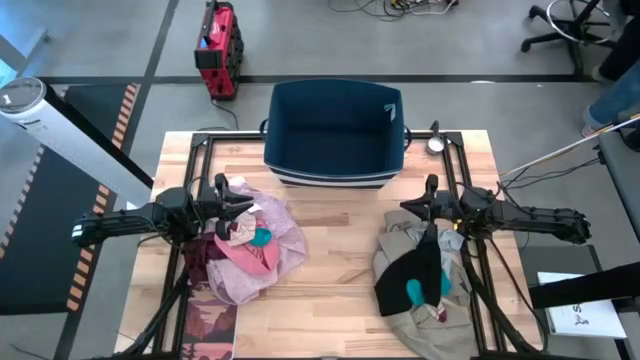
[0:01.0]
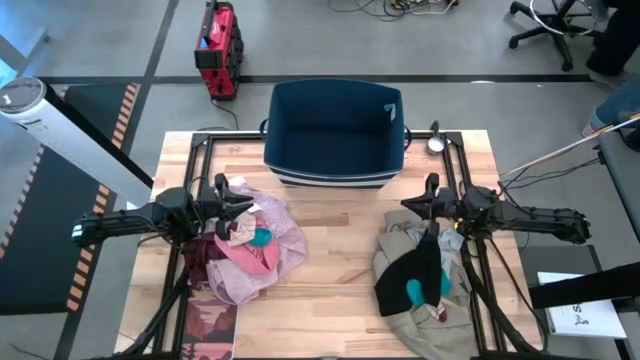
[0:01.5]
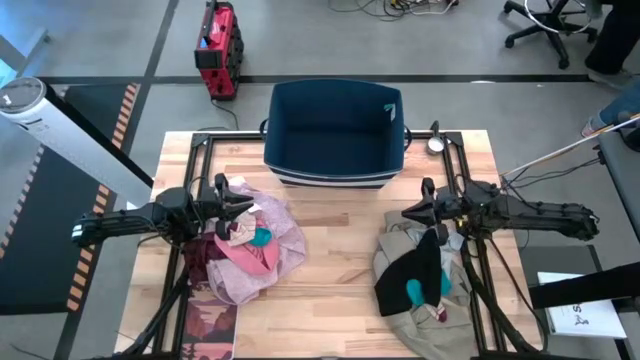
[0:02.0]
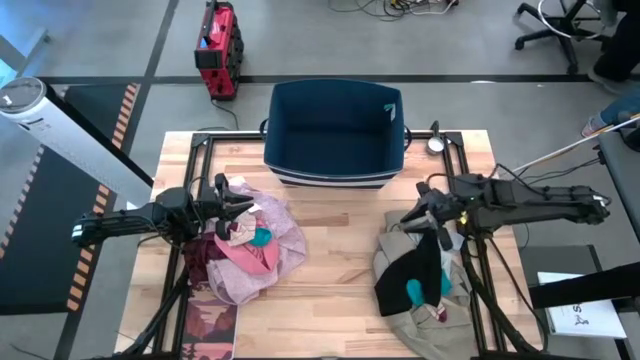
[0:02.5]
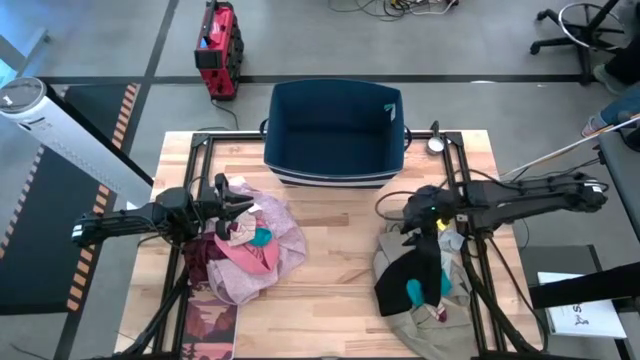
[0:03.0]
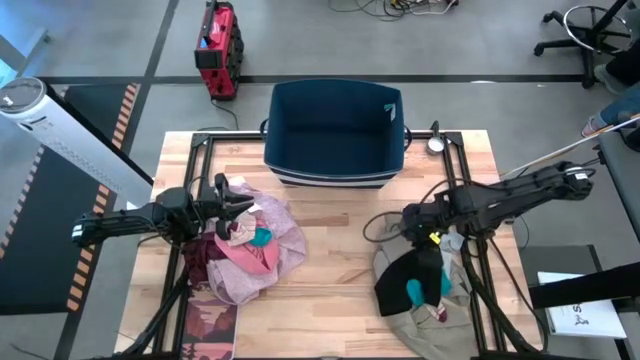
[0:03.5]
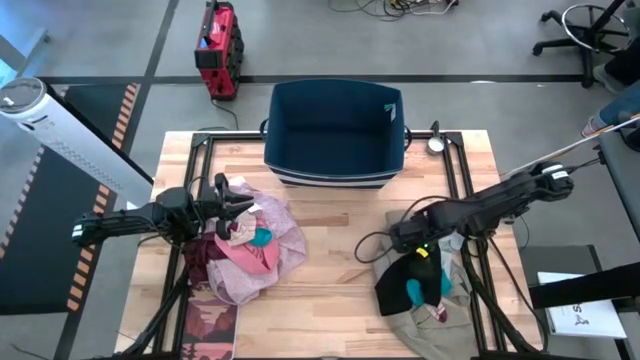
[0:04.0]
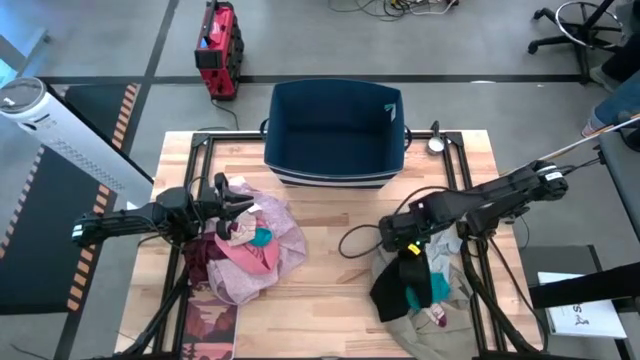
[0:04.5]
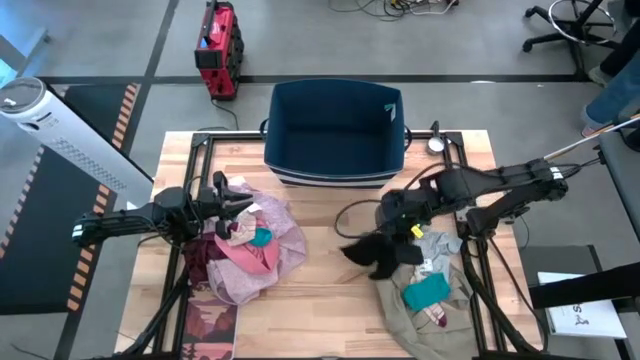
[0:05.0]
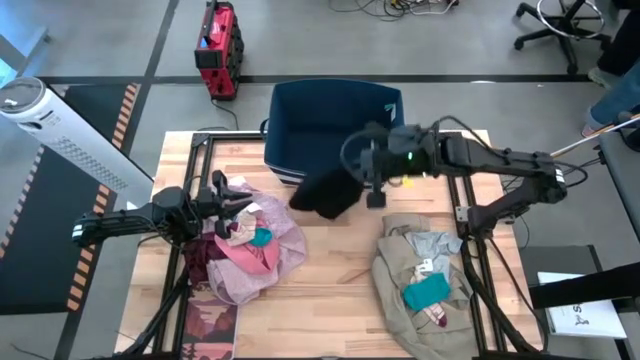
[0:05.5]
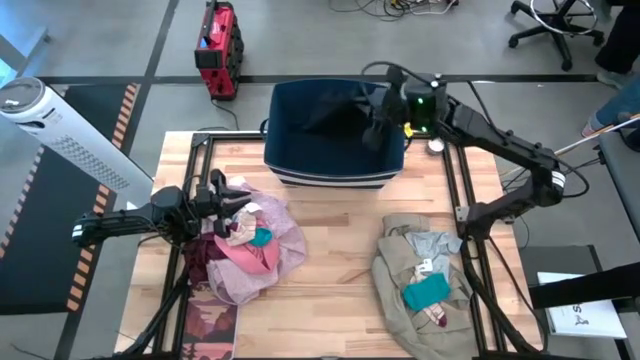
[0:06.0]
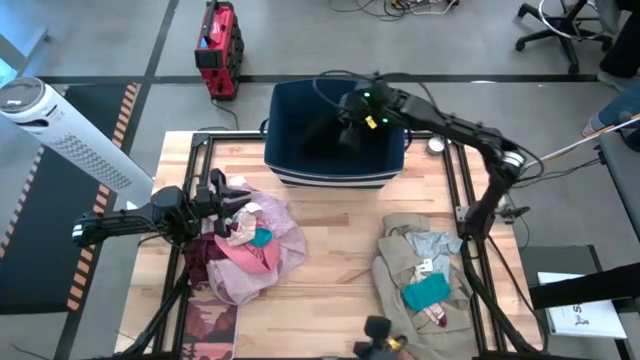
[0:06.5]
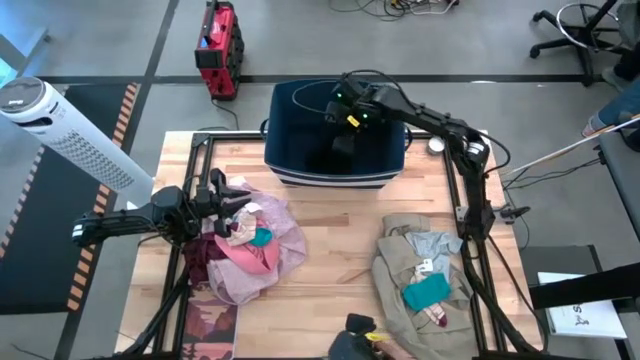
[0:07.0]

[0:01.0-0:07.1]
Task: Sort clothes
Put the black shorts into the blue laundry organizer

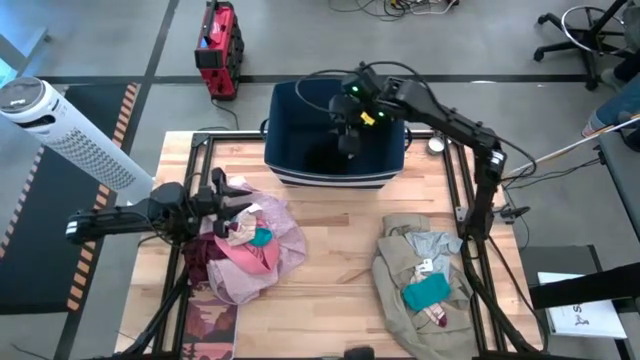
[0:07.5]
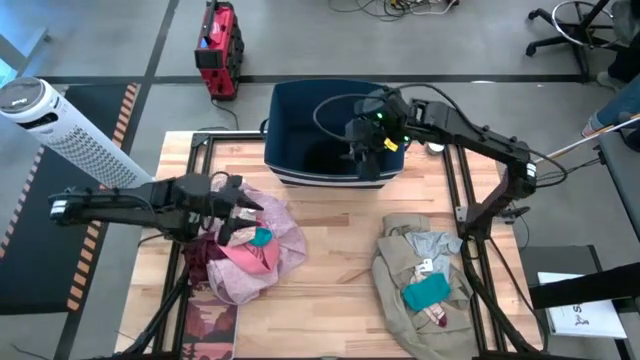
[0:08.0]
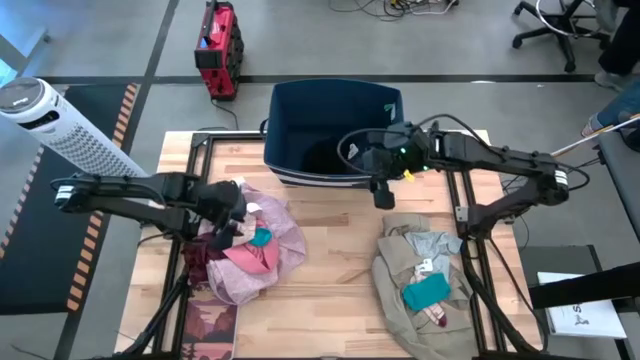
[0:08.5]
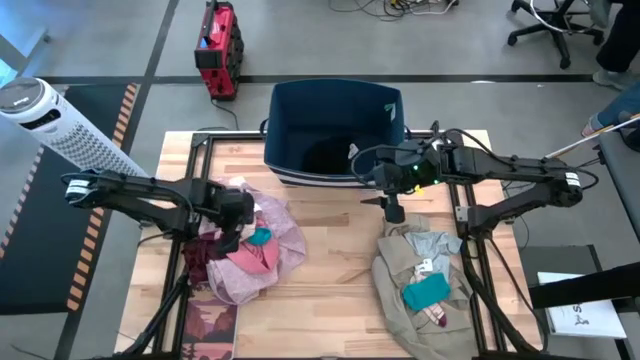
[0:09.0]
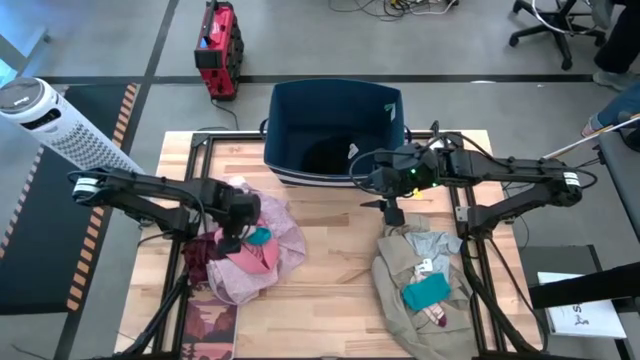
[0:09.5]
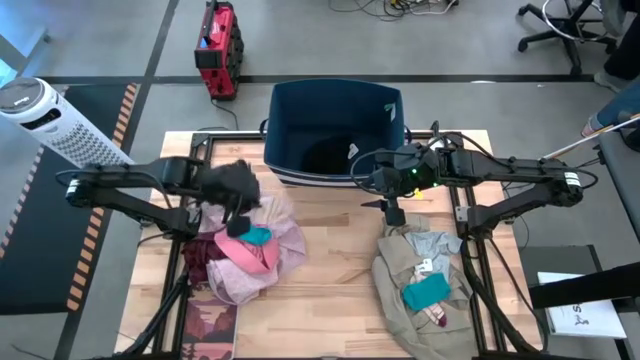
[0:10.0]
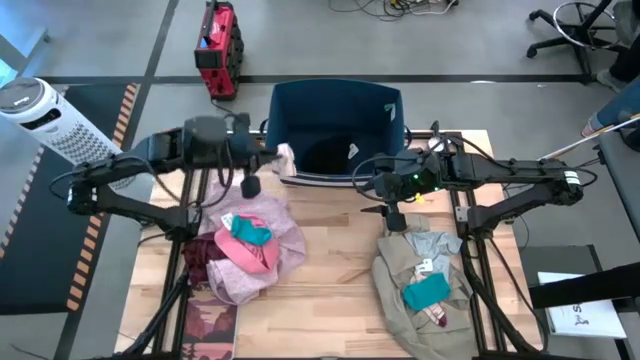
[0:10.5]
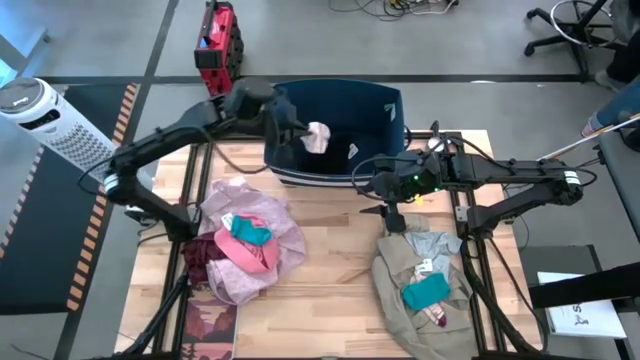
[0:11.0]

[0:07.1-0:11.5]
Put the left white sock into the blue laundry organizer

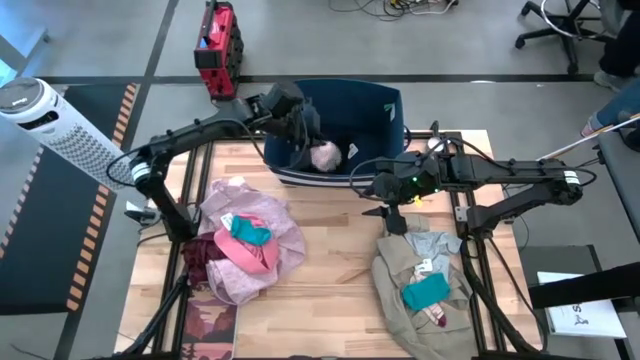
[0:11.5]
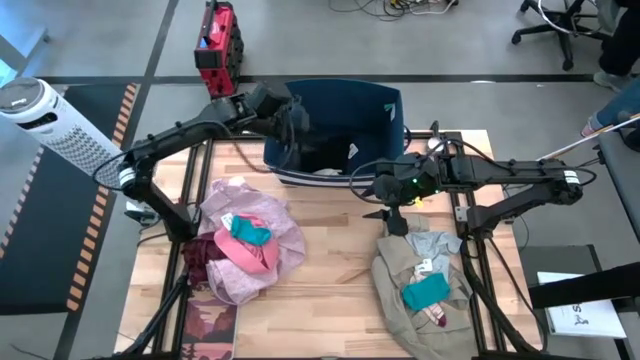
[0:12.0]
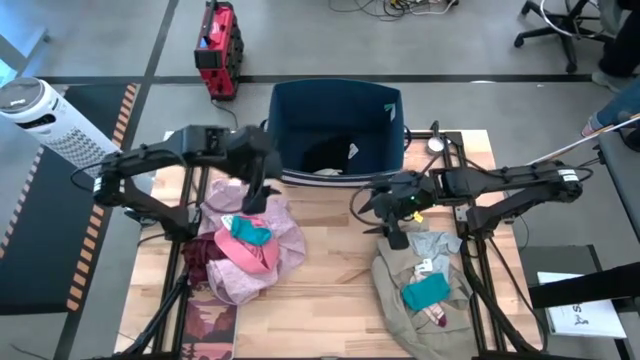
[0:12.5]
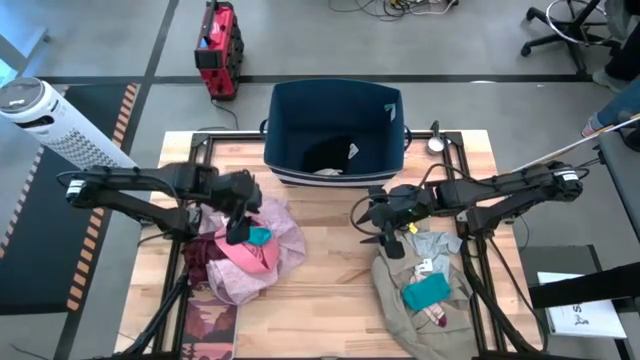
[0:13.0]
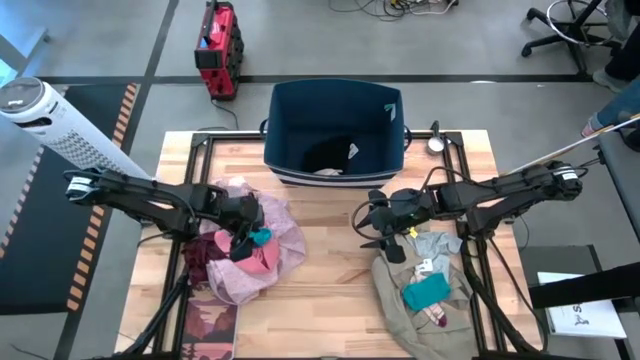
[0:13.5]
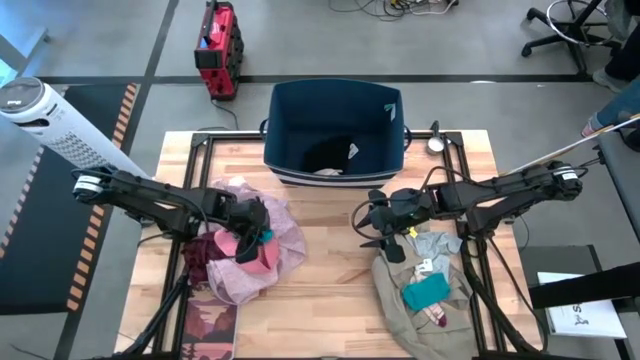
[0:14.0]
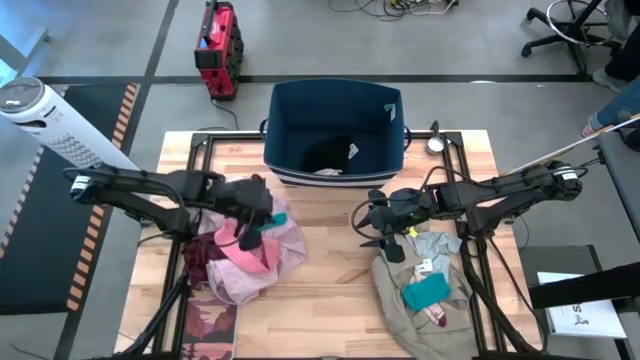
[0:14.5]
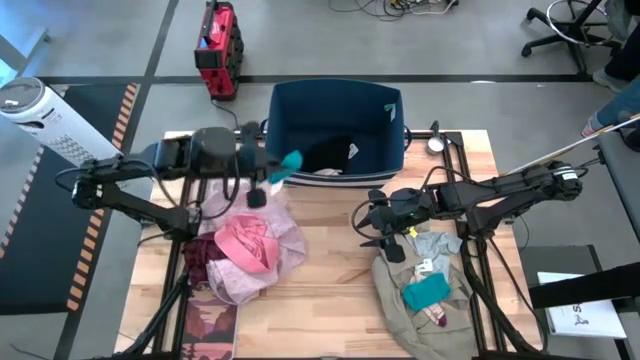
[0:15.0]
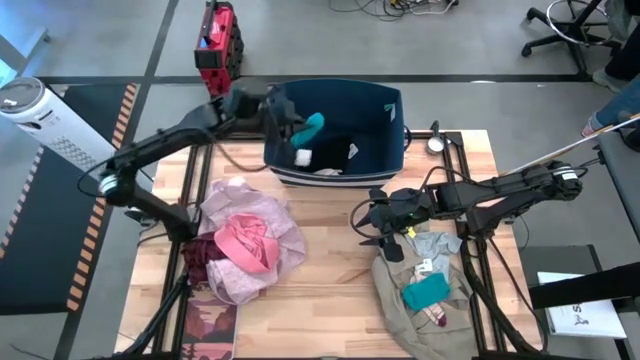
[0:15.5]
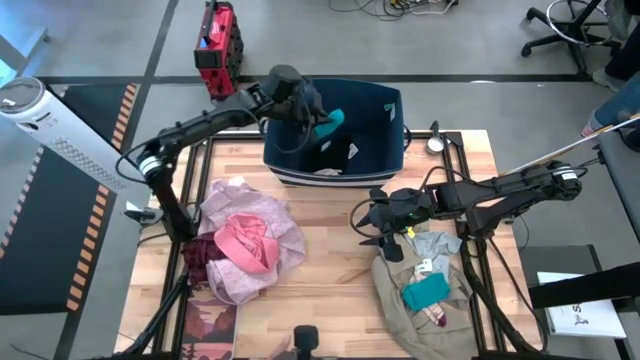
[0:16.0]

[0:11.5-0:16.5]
Put the left blue sock into the blue laundry organizer

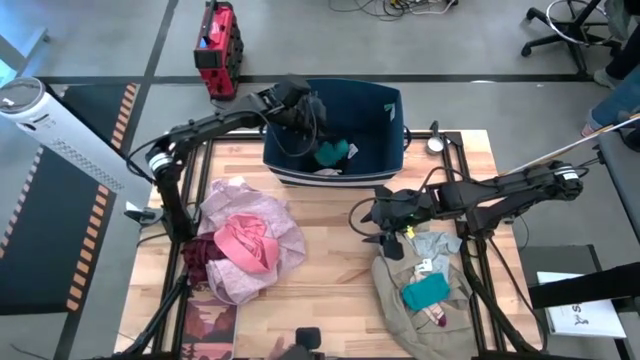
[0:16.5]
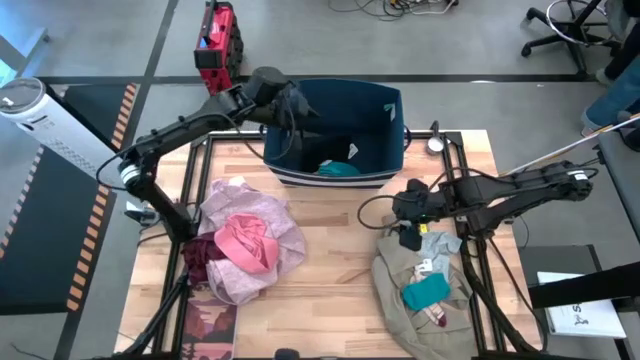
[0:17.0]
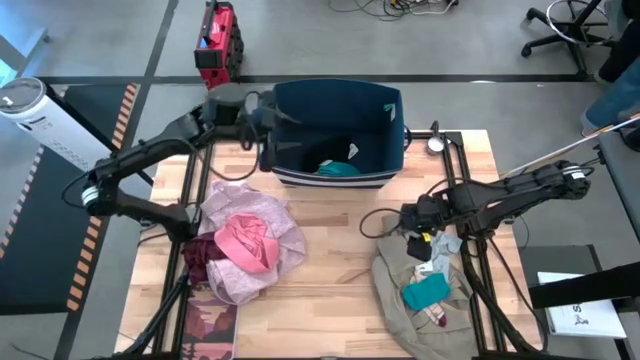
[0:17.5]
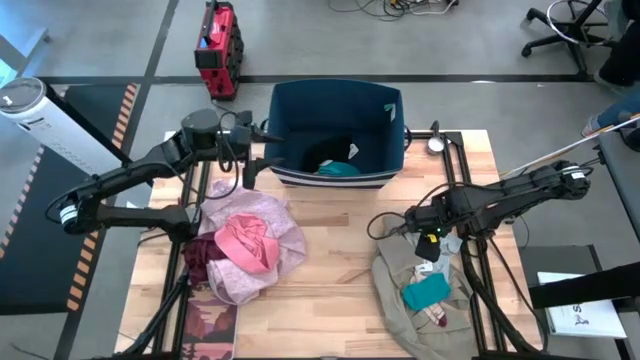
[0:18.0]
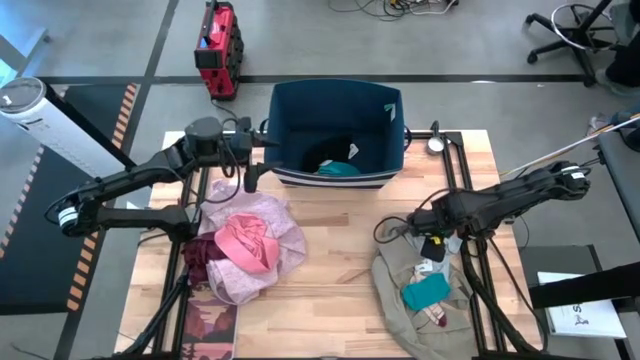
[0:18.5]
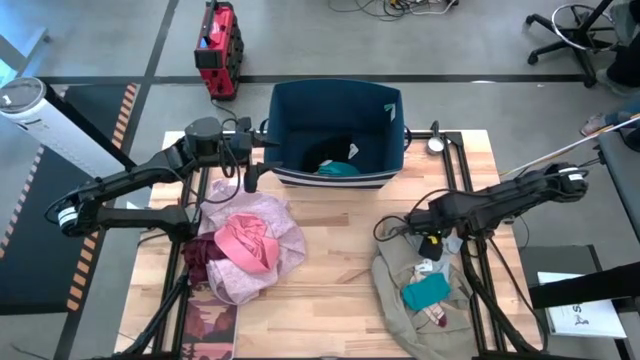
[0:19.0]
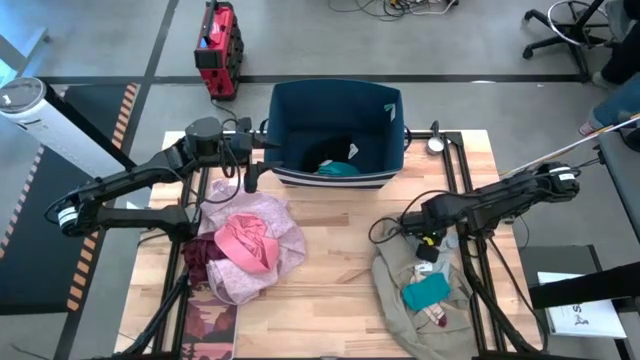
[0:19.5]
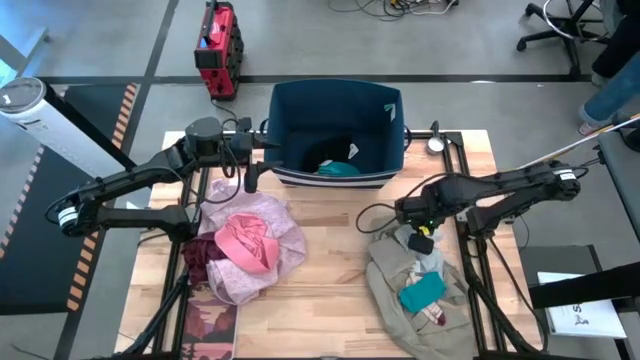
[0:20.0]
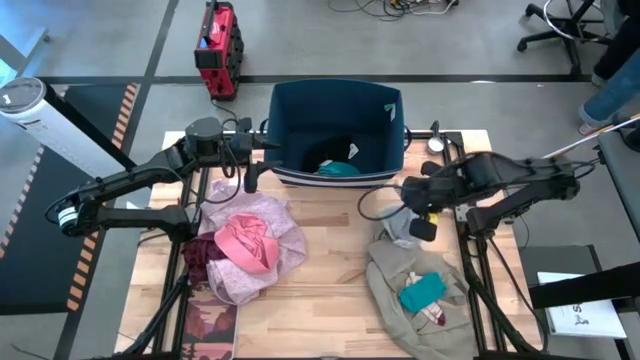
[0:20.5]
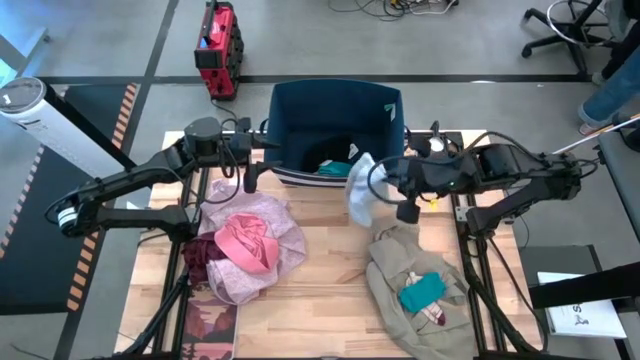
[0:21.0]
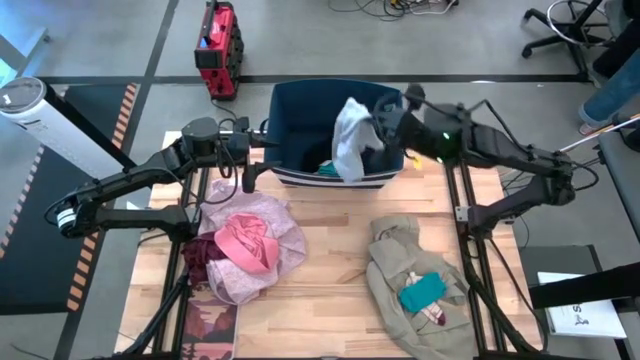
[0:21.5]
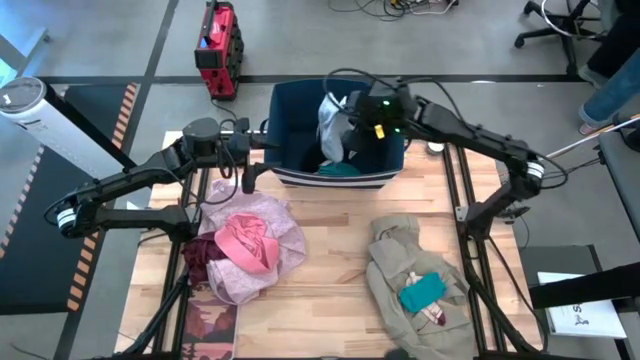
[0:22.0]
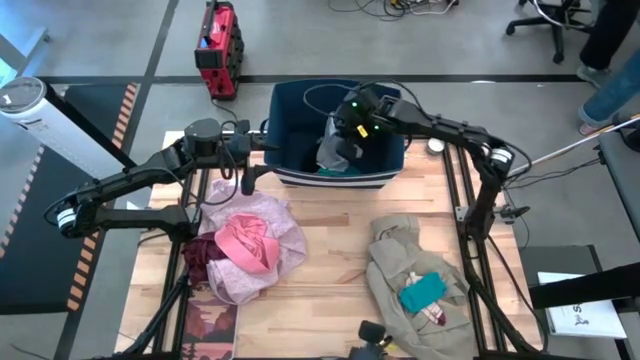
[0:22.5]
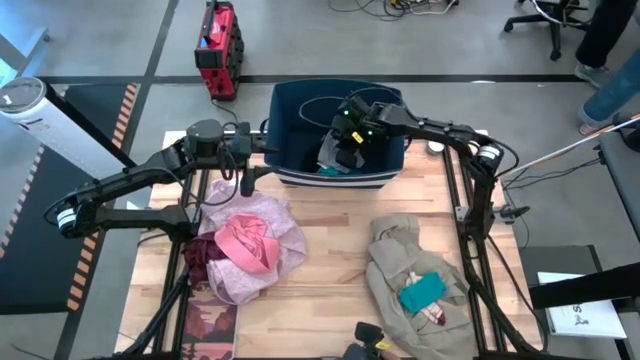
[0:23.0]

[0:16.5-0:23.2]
Put the gray underwear into the laundry organizer
